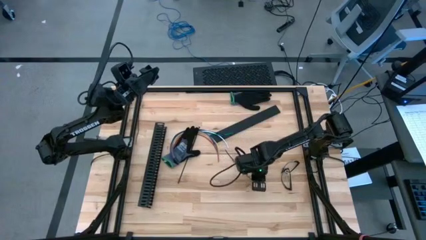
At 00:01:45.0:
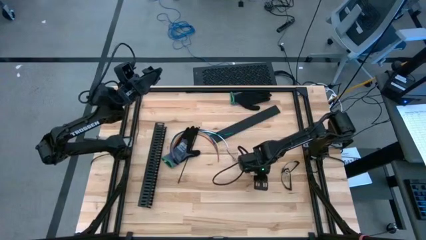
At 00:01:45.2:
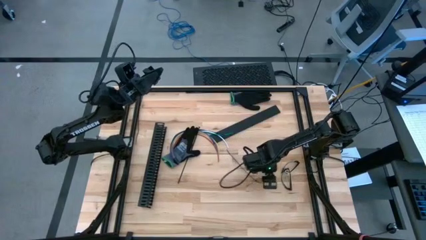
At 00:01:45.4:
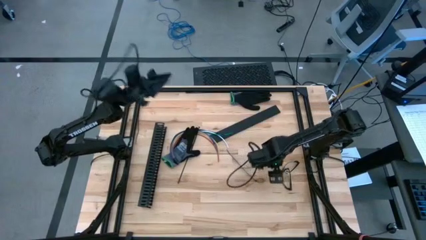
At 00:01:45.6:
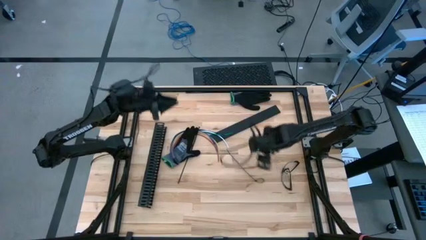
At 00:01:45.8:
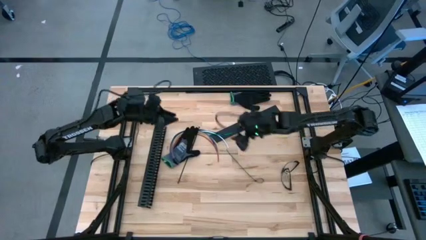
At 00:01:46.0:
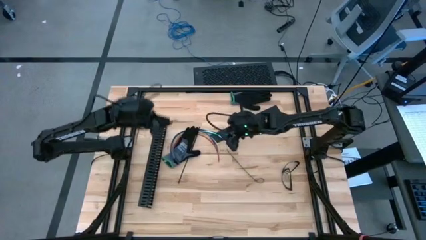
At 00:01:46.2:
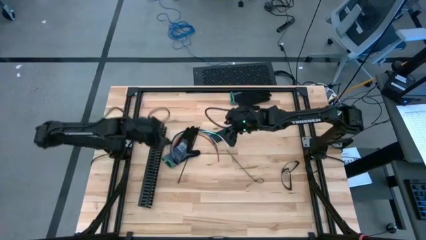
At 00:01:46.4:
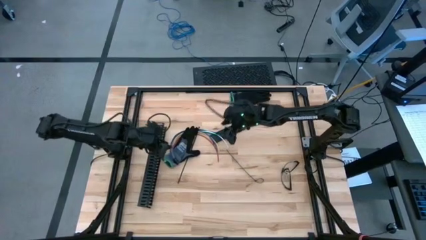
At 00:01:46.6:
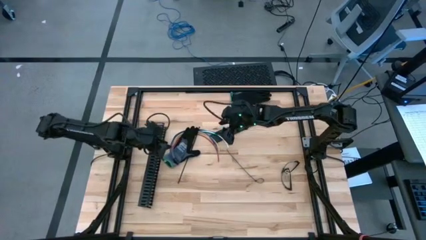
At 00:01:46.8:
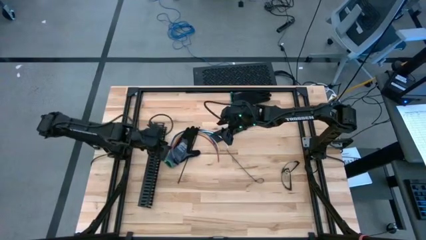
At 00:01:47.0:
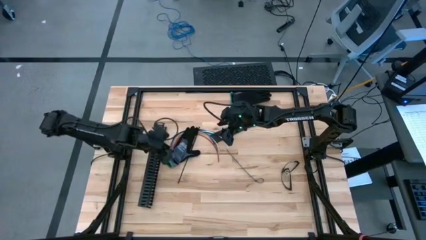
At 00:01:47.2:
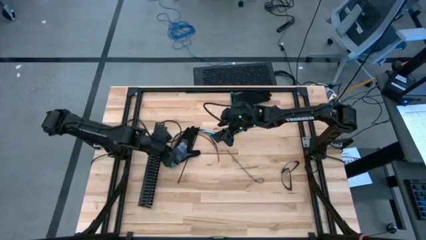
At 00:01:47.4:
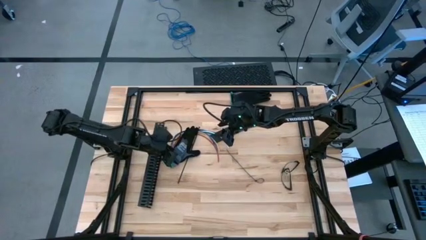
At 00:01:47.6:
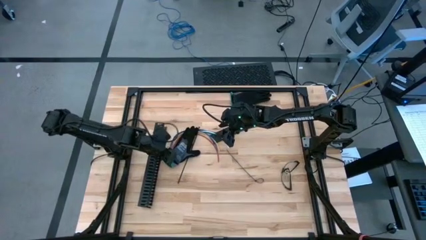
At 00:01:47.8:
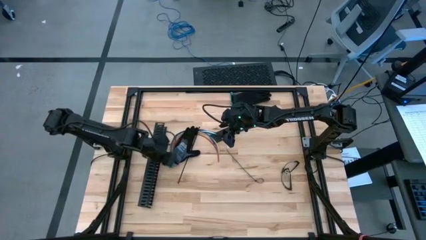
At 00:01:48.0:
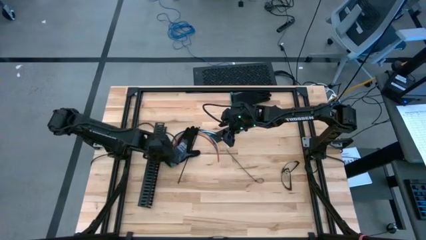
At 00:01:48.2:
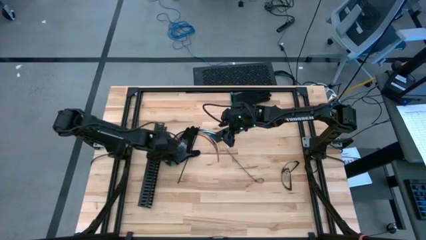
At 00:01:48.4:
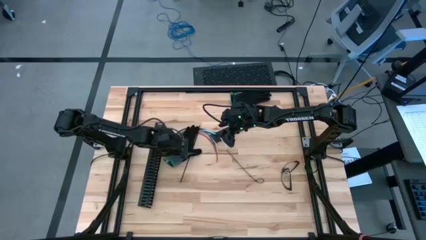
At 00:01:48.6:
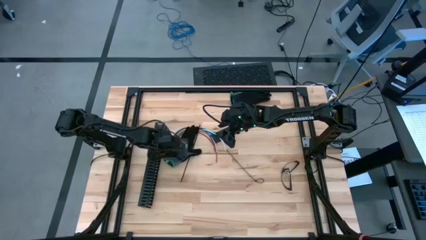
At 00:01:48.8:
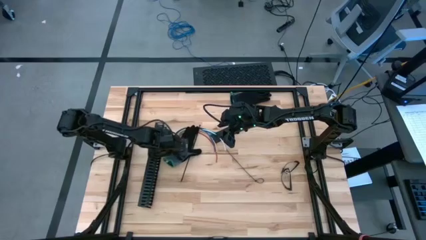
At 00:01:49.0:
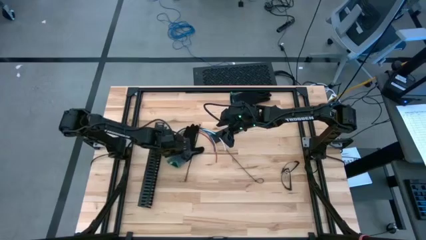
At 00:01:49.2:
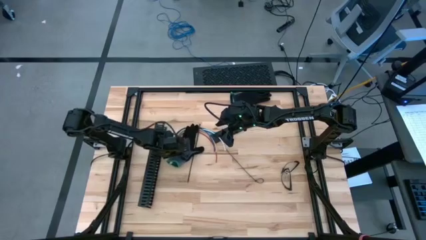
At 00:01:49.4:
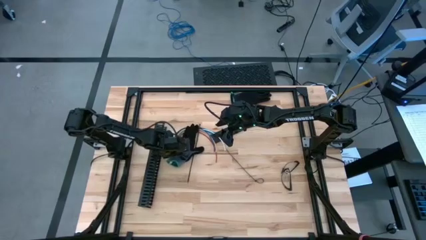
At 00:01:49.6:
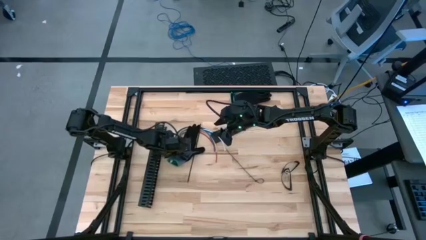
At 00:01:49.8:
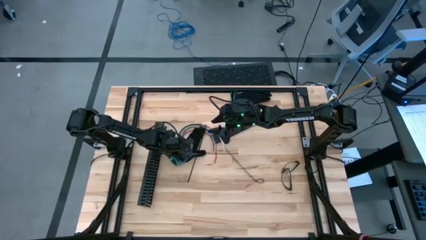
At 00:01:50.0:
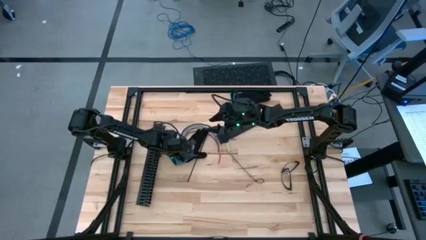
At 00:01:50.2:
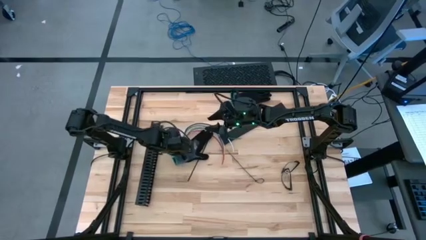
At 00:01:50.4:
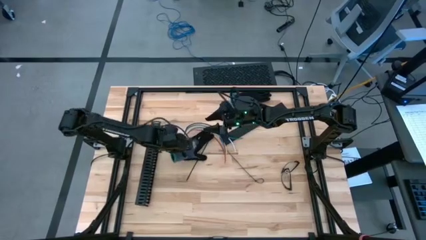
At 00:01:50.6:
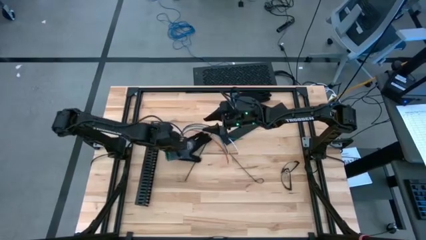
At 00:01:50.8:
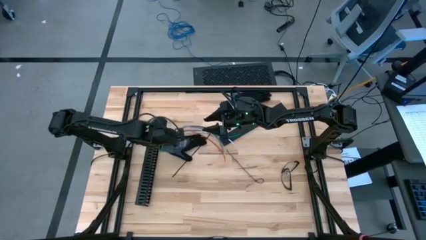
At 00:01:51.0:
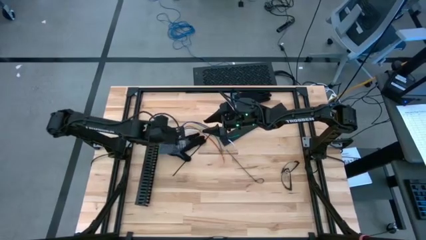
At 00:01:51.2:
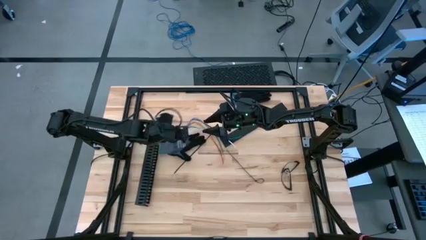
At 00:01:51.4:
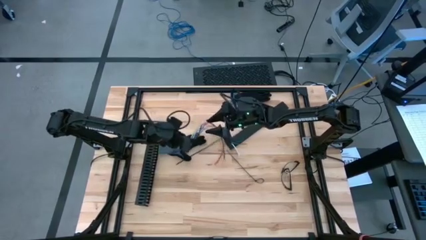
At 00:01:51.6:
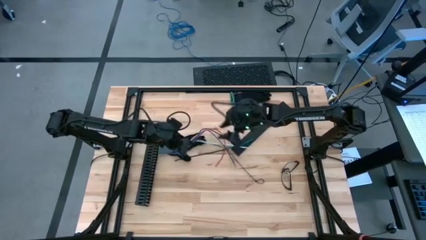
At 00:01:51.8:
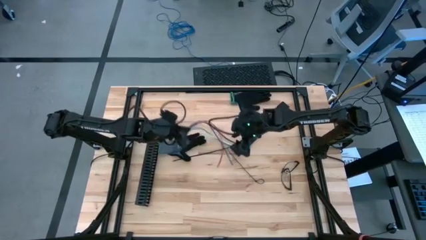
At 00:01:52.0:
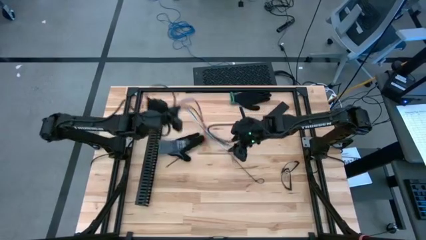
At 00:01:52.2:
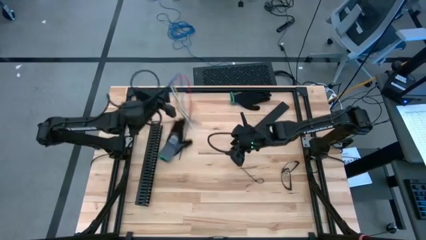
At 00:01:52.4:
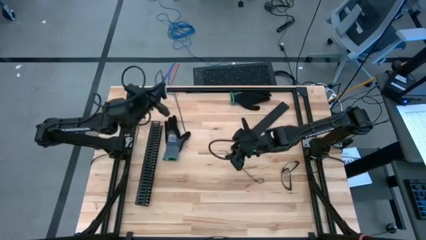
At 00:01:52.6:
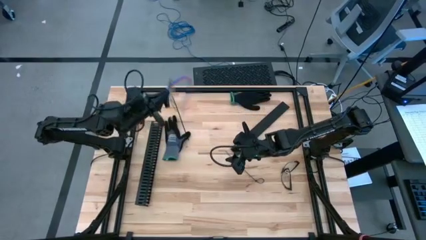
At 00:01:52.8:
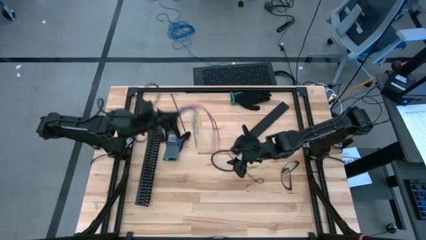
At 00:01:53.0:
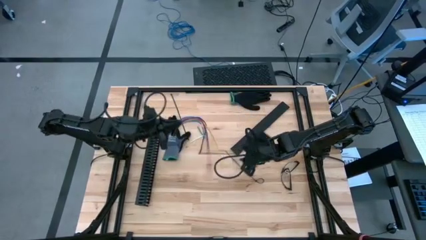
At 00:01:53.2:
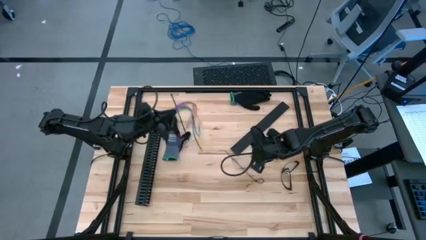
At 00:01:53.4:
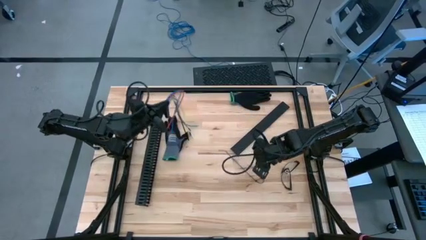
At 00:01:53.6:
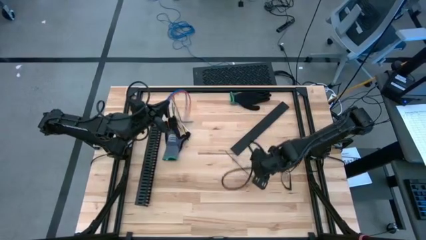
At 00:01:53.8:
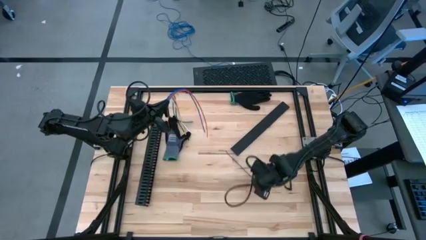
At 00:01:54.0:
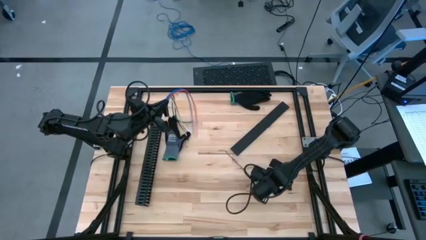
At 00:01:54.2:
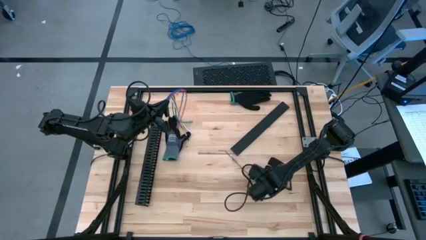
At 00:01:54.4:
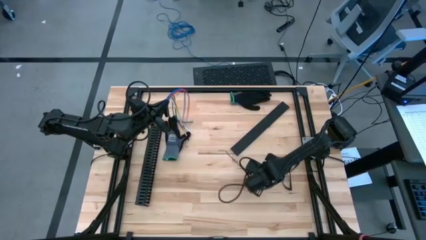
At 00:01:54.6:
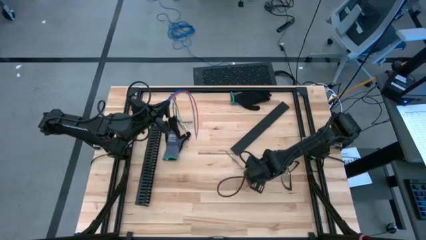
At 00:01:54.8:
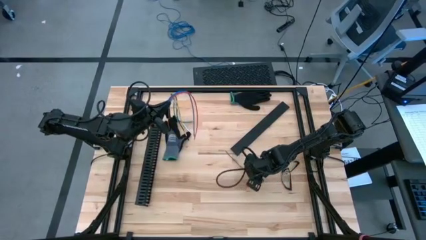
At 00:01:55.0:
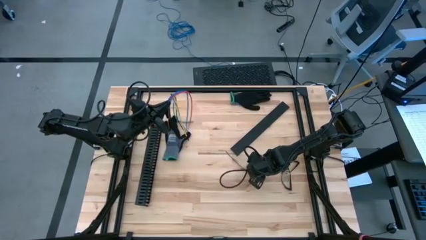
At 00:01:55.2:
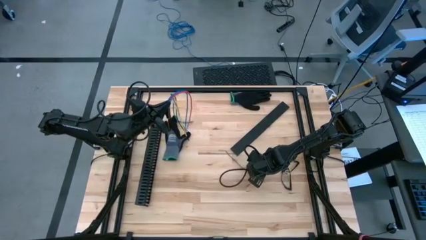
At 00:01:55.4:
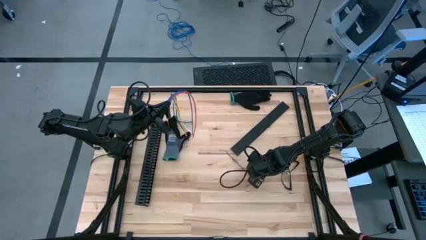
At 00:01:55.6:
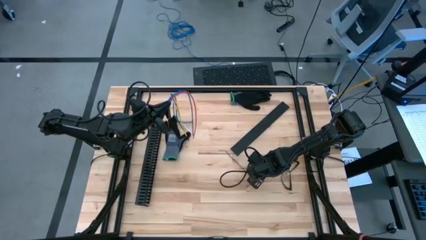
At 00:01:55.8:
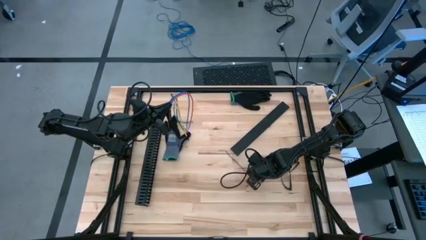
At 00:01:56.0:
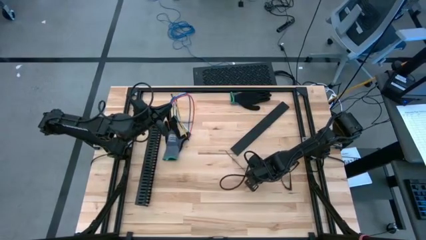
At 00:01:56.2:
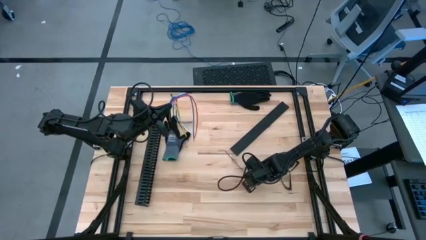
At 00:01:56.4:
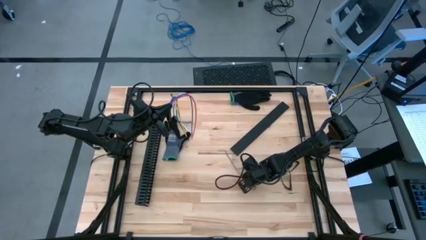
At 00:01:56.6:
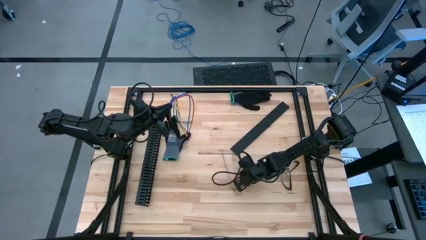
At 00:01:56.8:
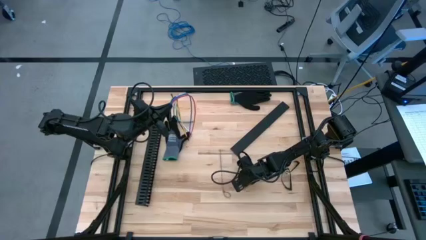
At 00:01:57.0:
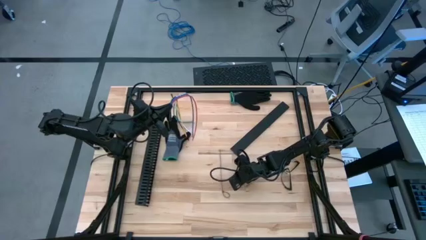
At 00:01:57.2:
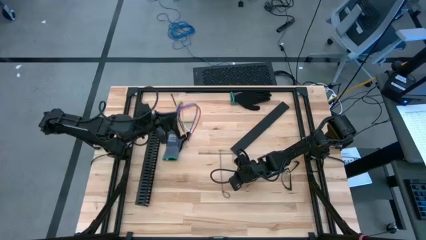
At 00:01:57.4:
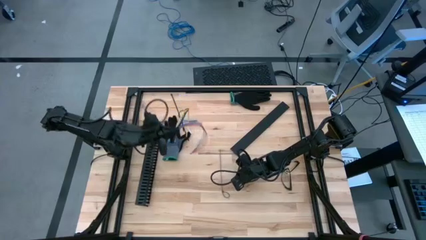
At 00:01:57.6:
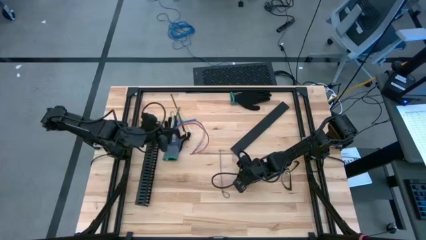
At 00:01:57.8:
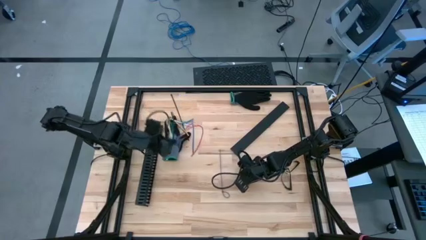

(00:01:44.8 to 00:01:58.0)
Task: Ziptie cables
Wrap the cable wires with the black zip tie
